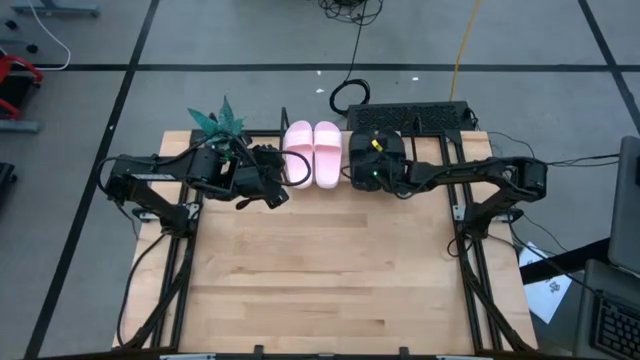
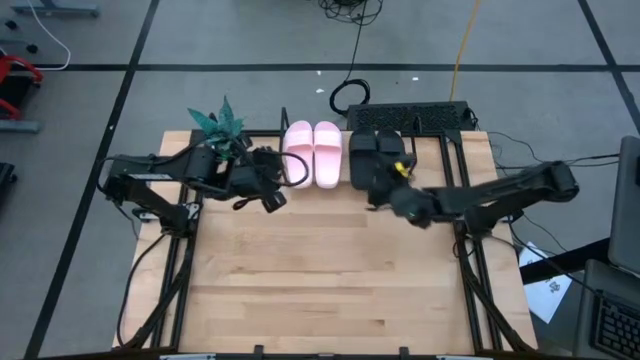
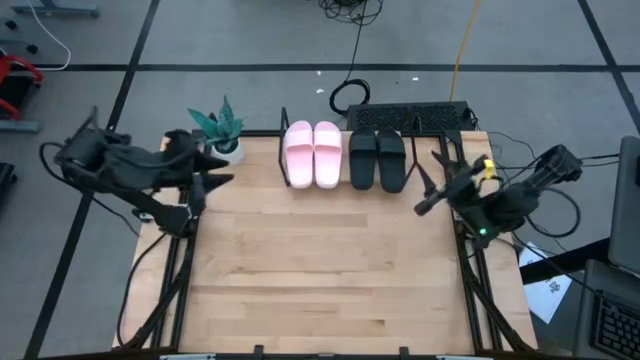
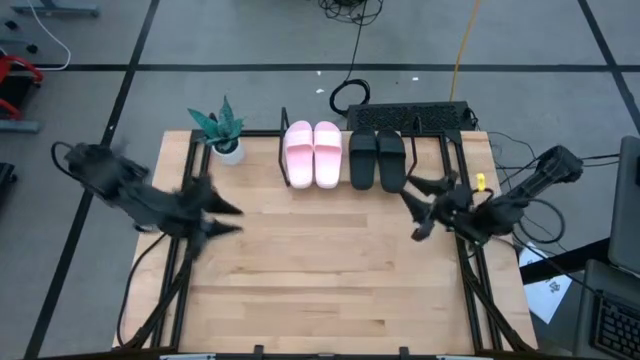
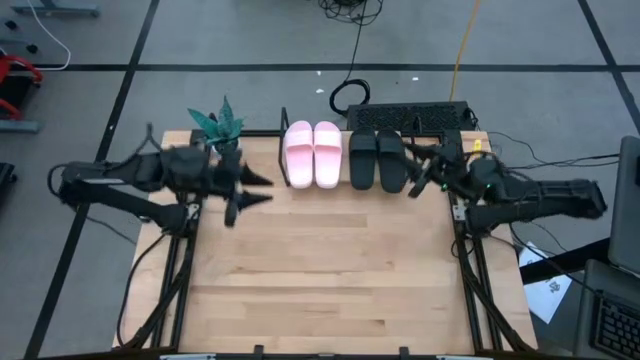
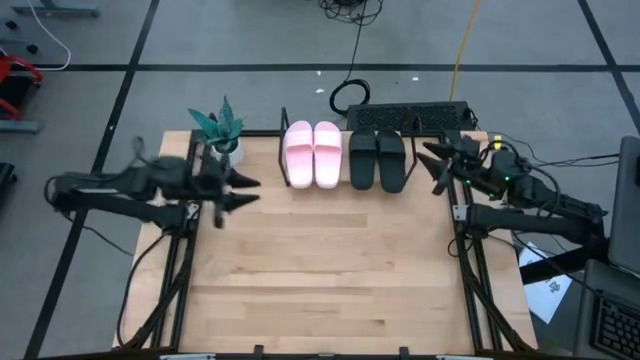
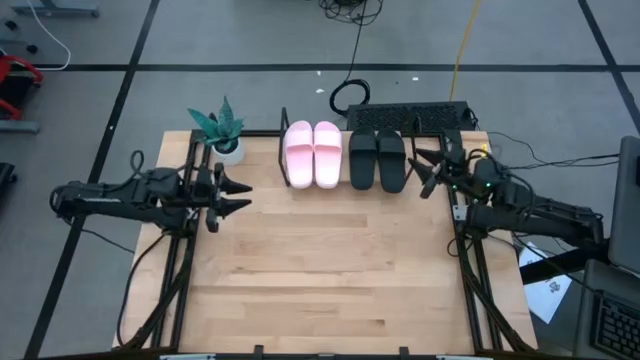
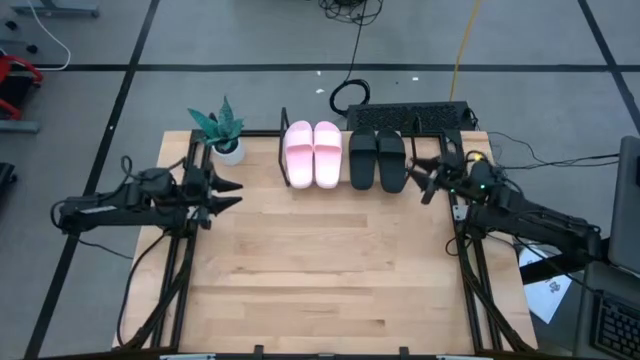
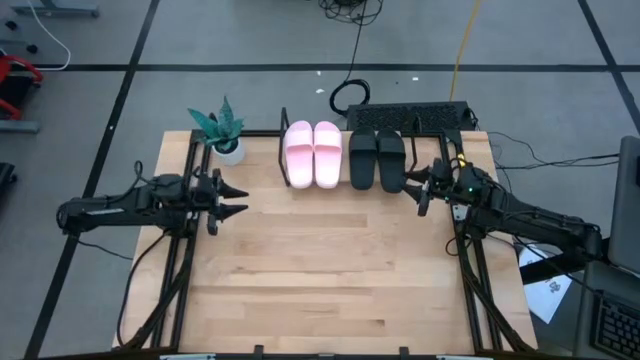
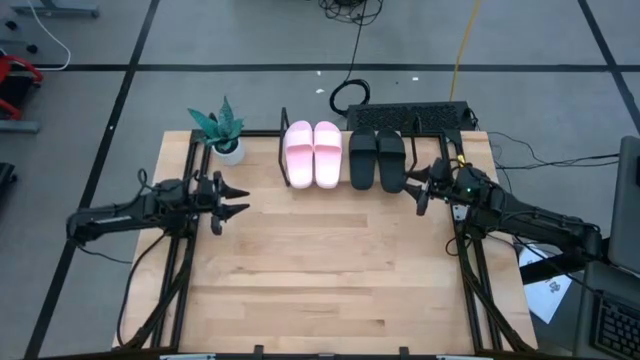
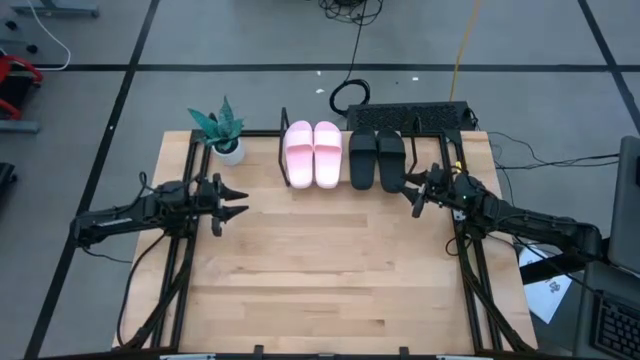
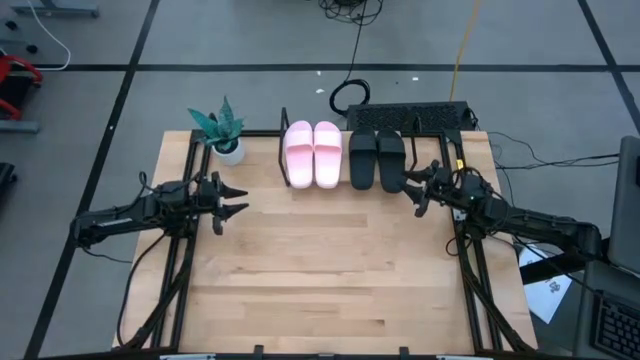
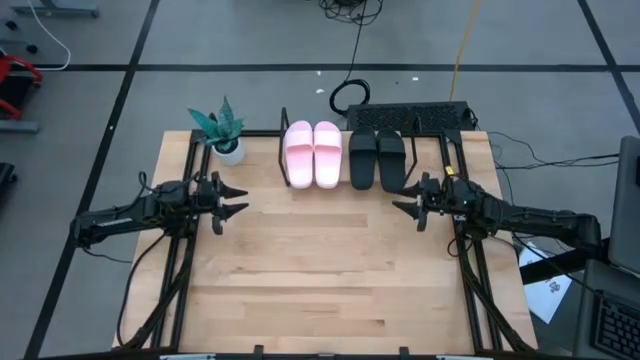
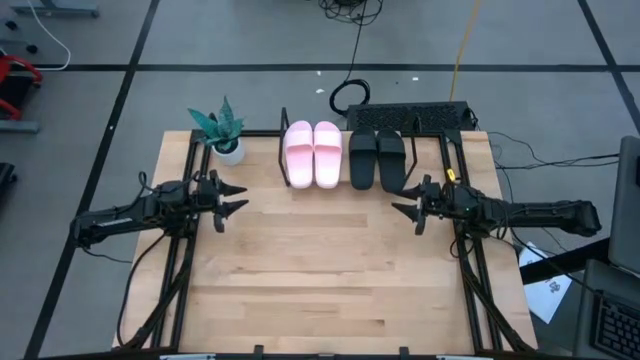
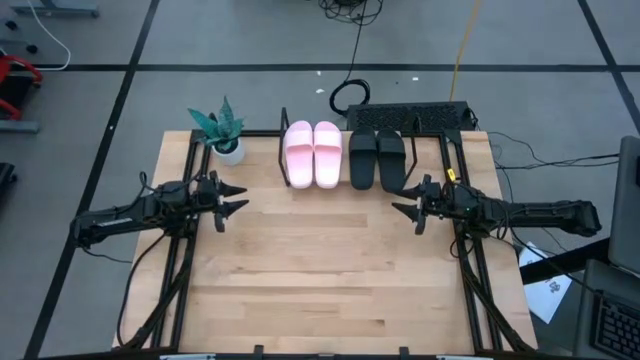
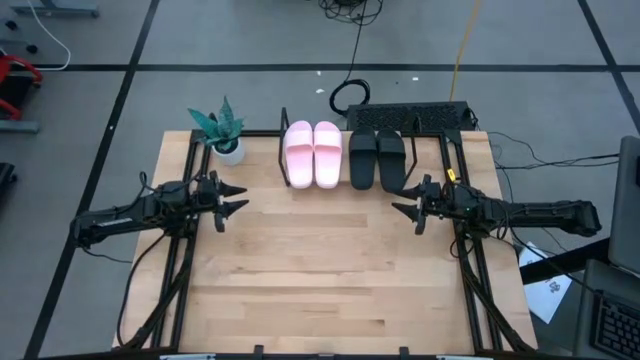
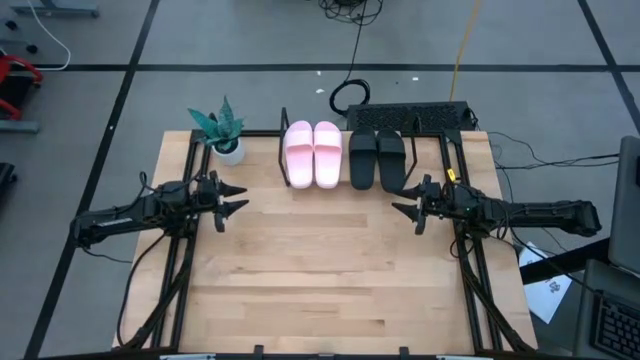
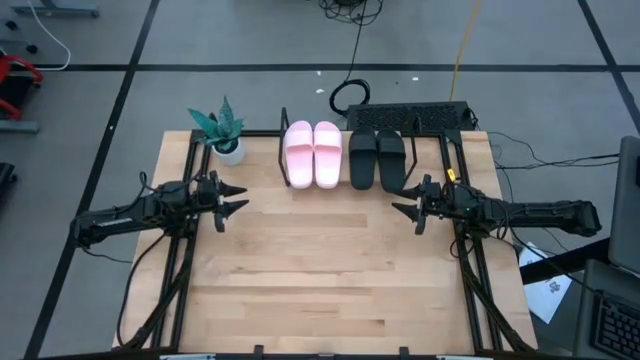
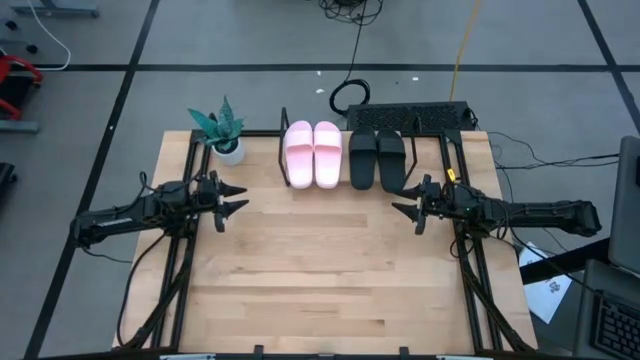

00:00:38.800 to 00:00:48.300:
Task: Pick and place slides into the shelf
Return to Home Position

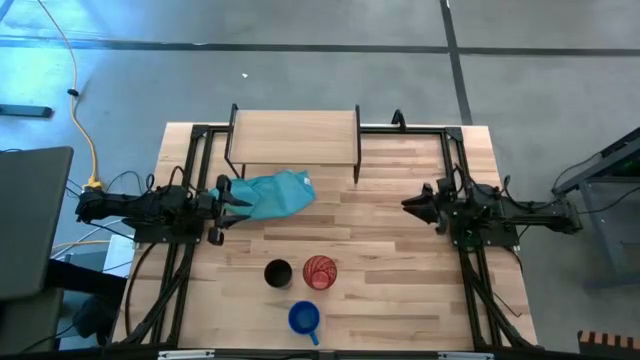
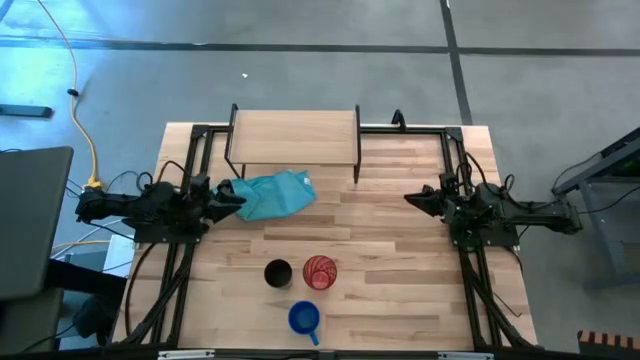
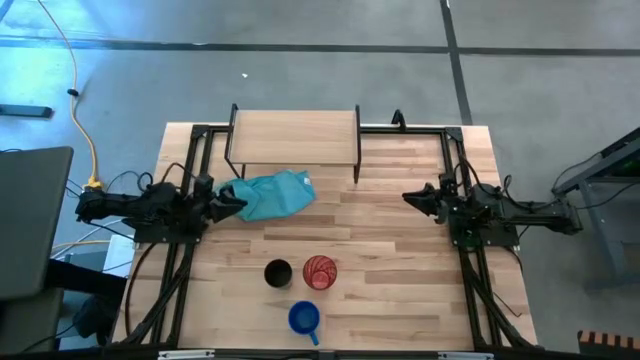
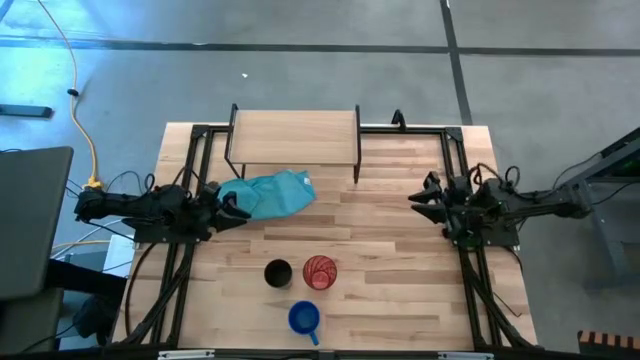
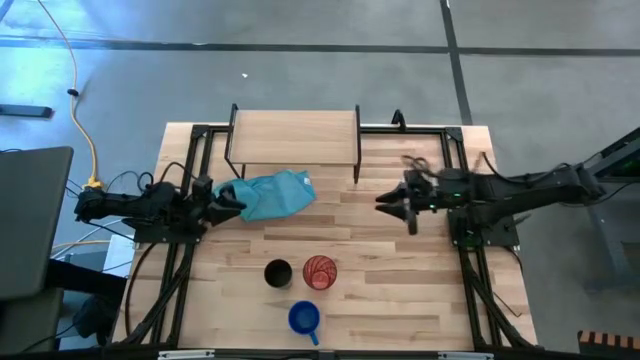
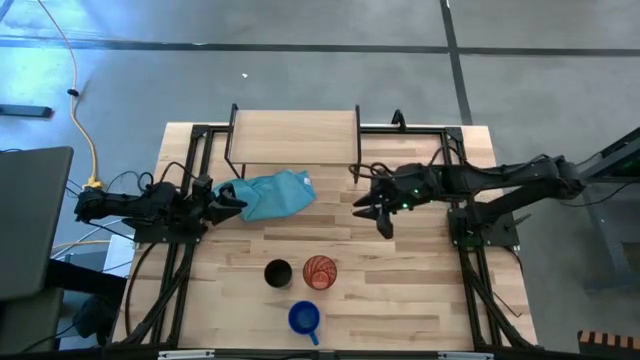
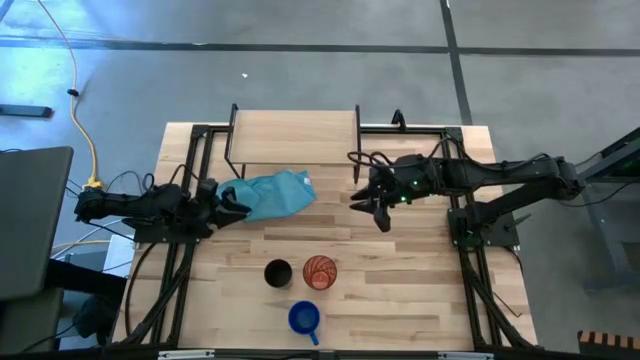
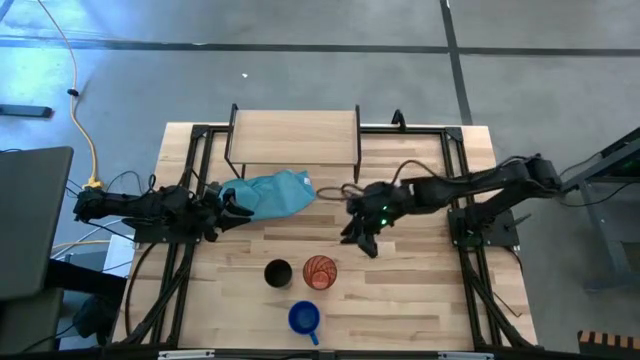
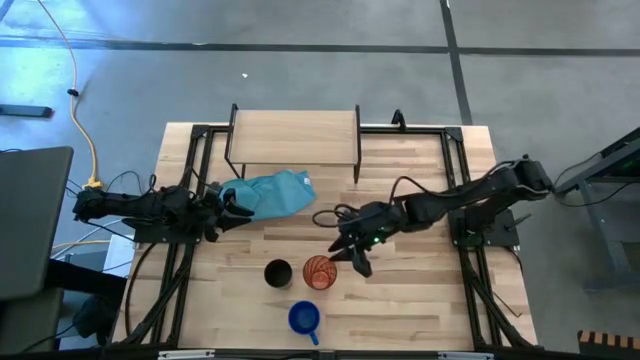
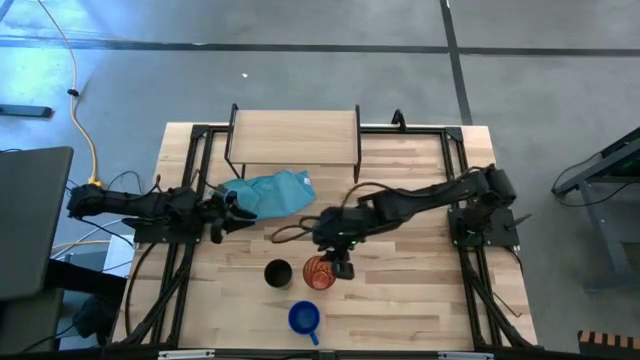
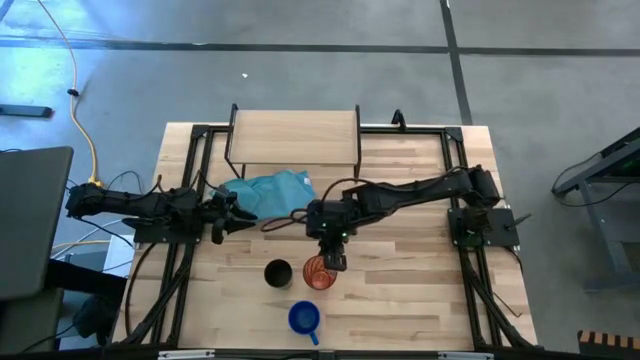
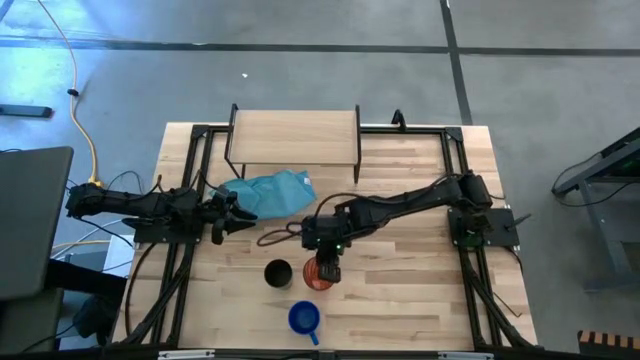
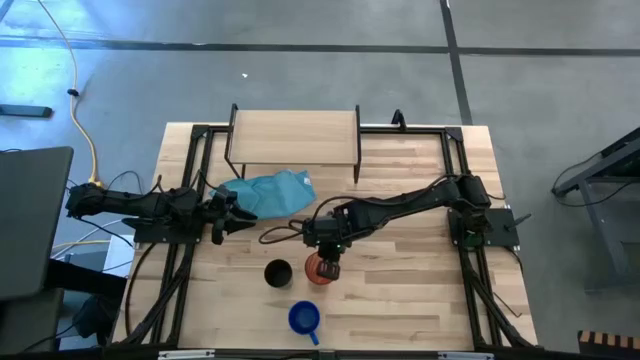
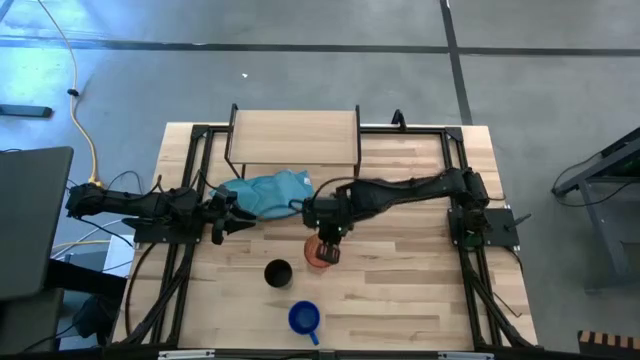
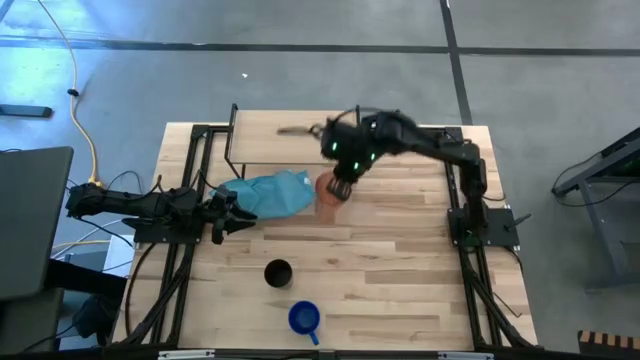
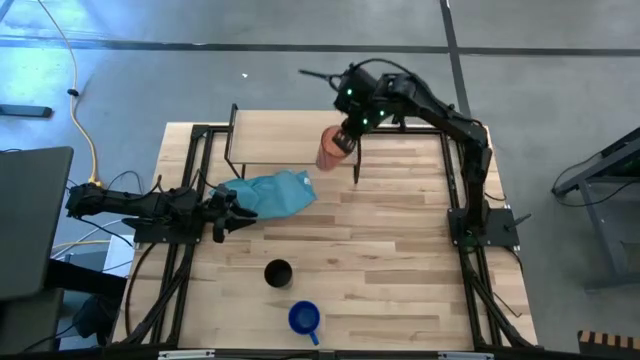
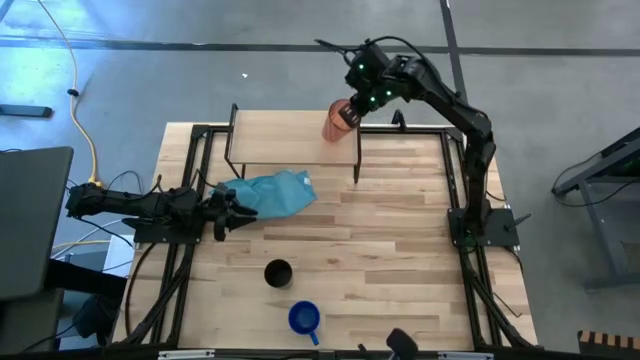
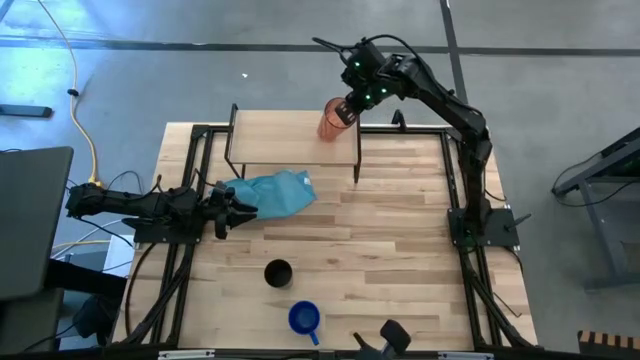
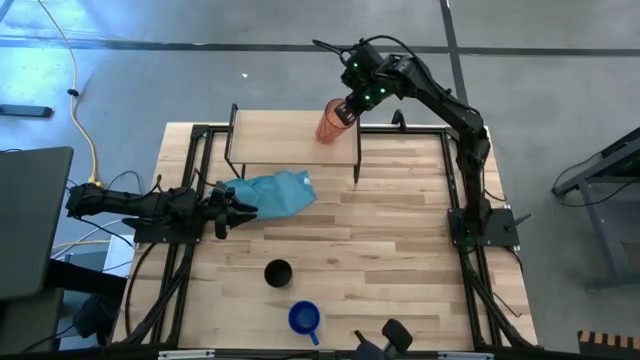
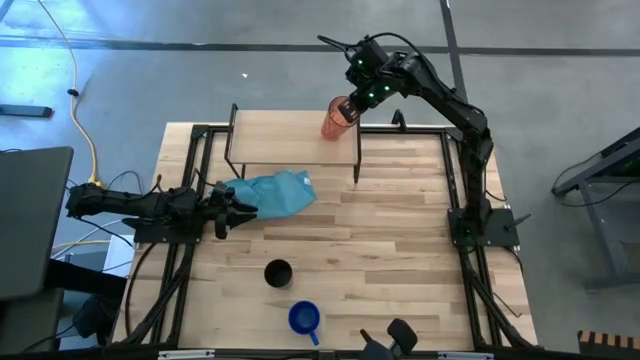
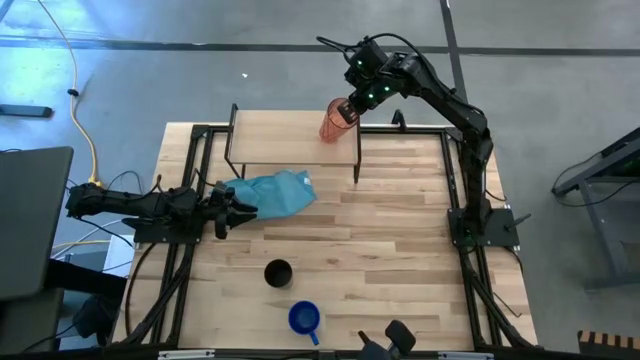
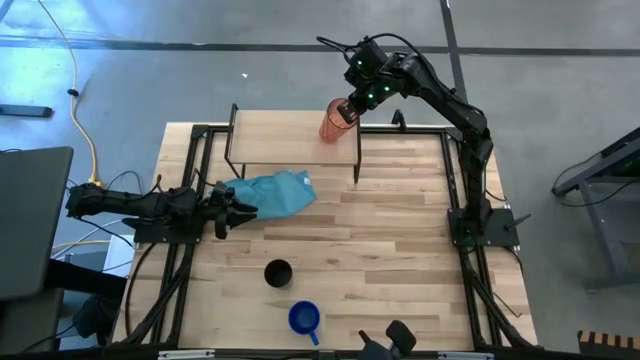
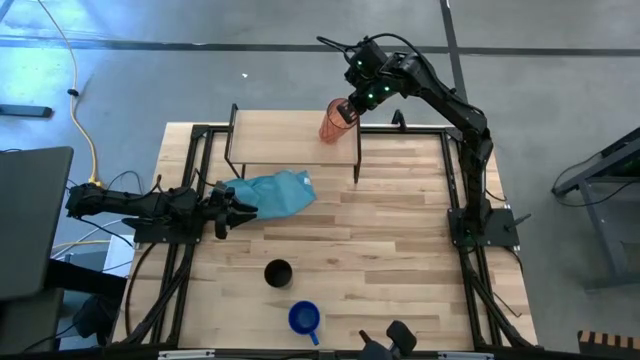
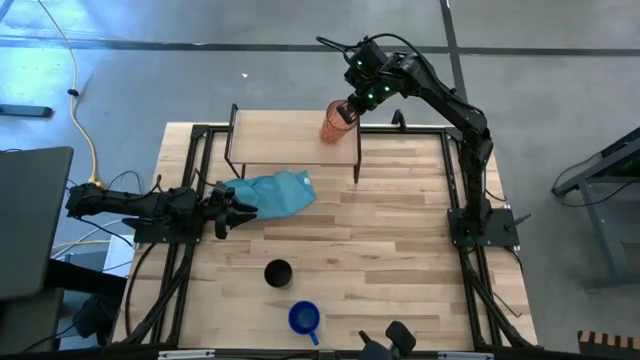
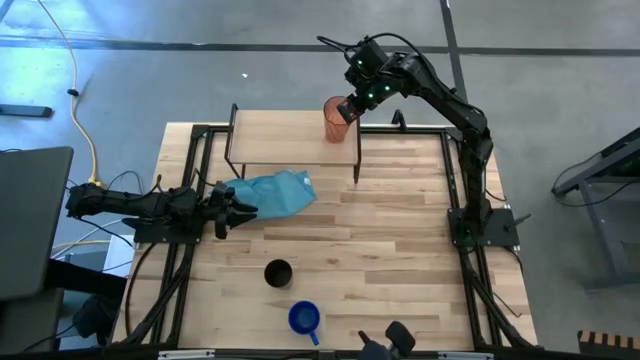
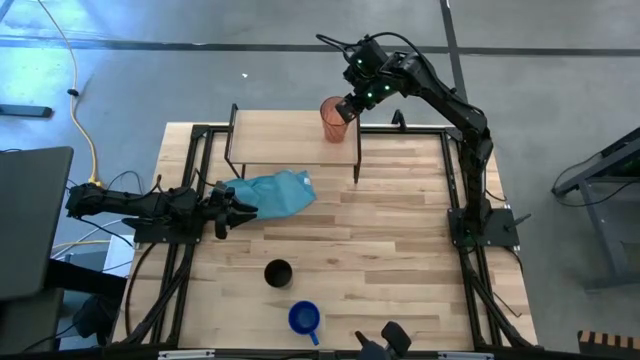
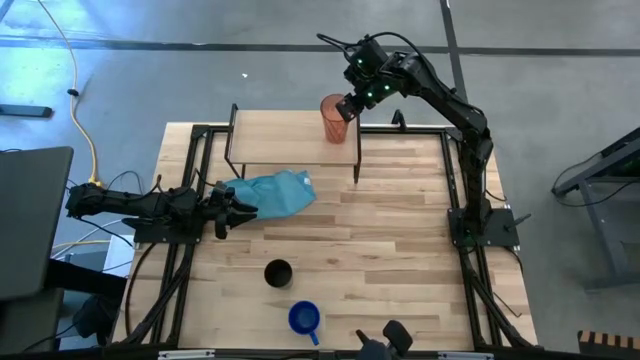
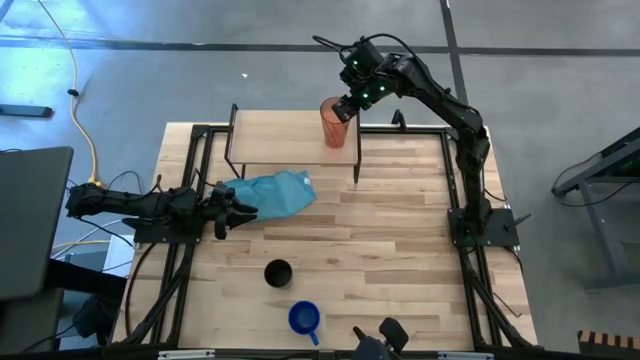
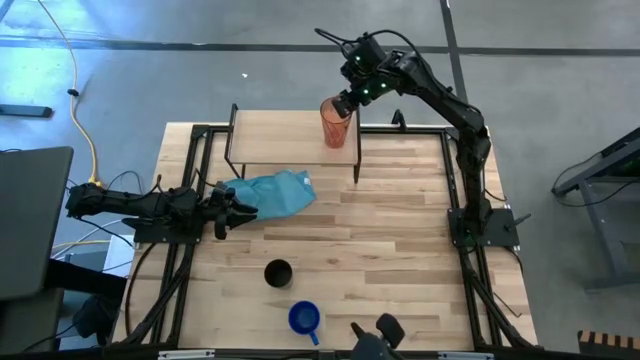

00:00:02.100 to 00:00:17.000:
Task: Stack small to large cups/mugs on shelf
Put the brown cup on the shelf
